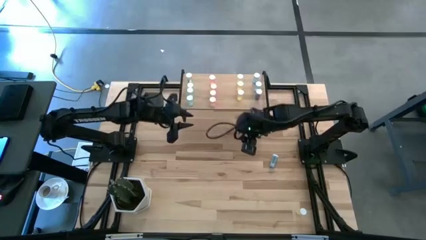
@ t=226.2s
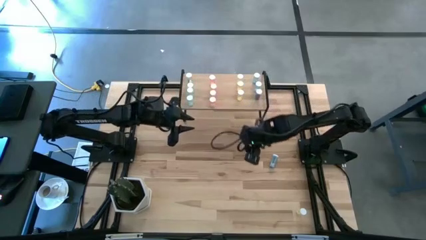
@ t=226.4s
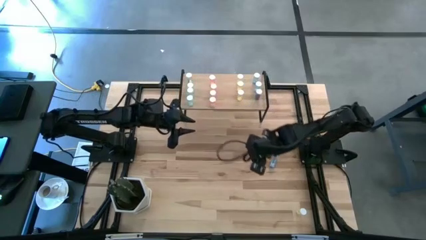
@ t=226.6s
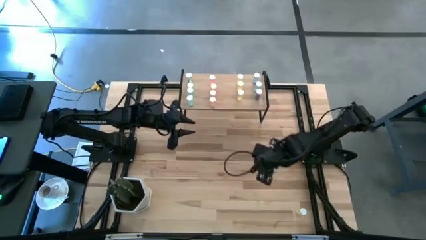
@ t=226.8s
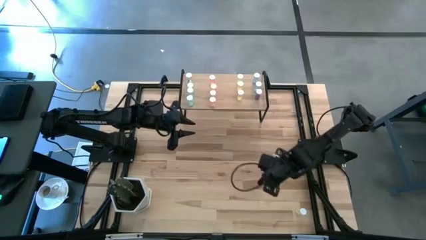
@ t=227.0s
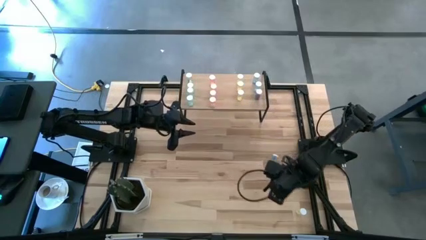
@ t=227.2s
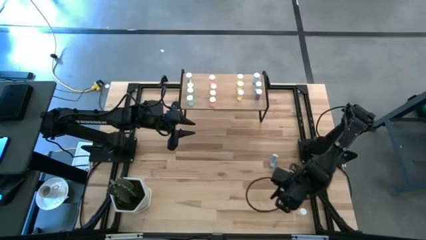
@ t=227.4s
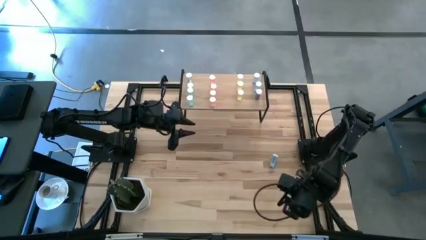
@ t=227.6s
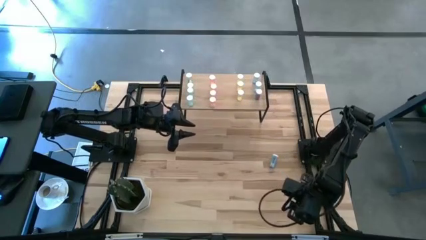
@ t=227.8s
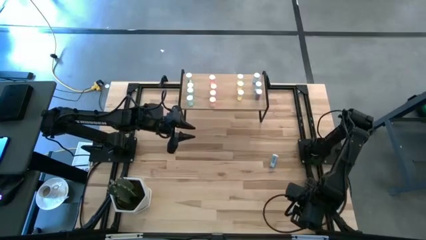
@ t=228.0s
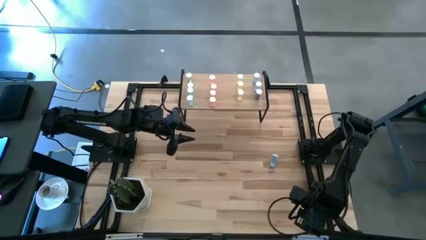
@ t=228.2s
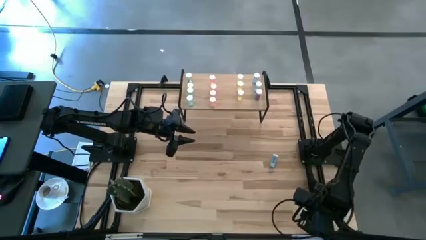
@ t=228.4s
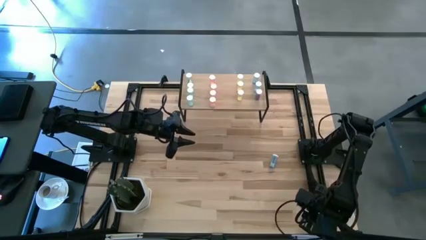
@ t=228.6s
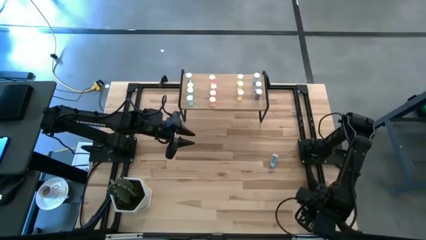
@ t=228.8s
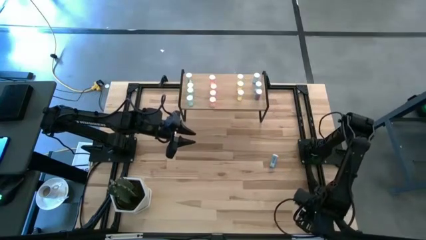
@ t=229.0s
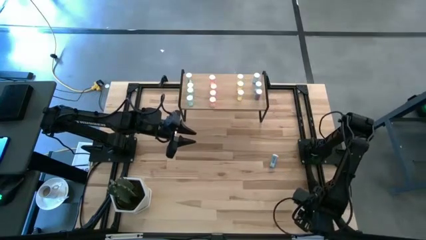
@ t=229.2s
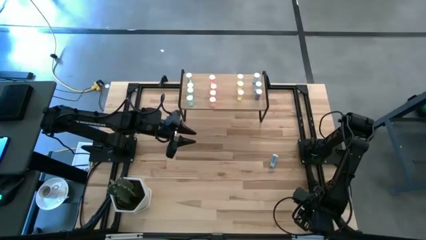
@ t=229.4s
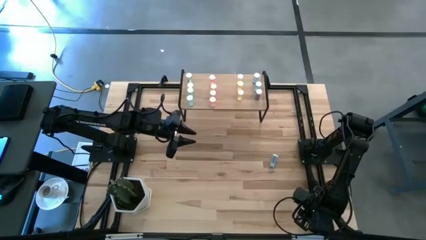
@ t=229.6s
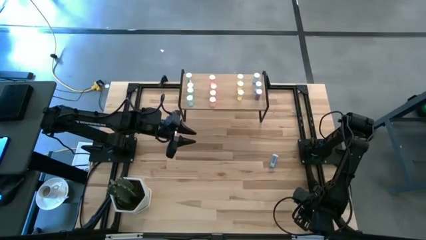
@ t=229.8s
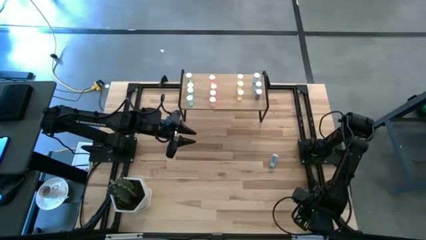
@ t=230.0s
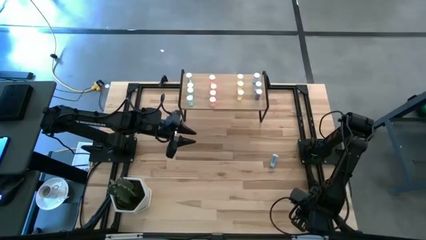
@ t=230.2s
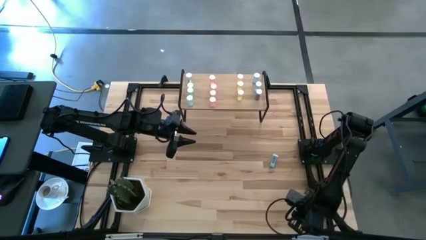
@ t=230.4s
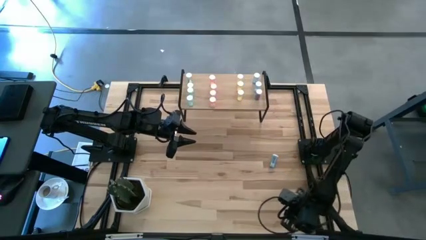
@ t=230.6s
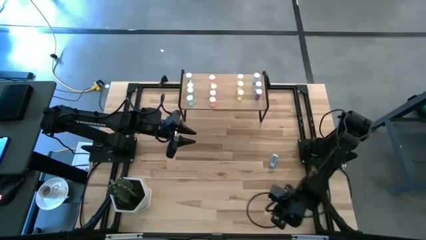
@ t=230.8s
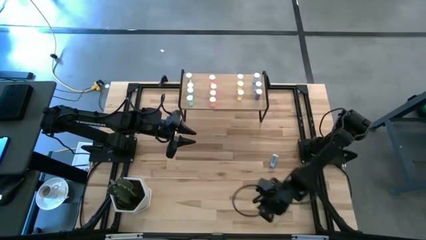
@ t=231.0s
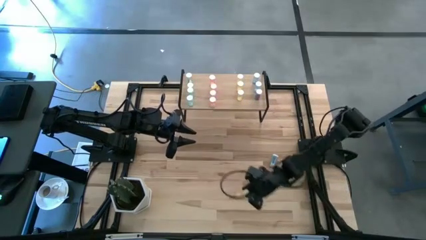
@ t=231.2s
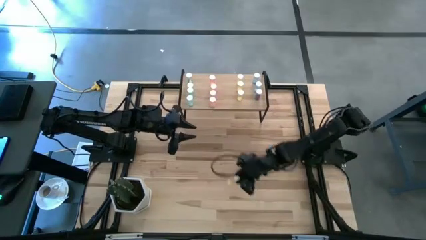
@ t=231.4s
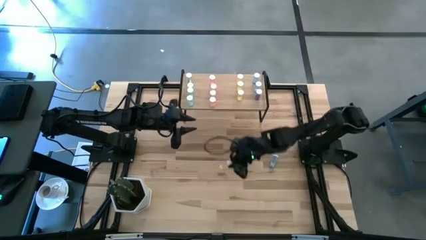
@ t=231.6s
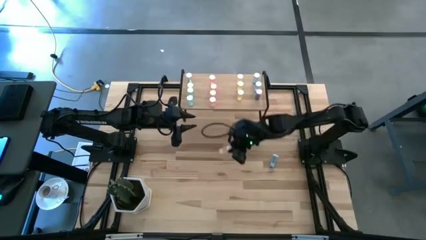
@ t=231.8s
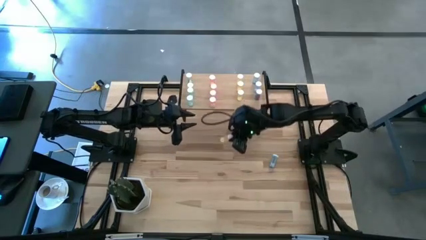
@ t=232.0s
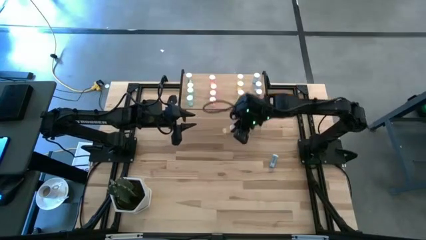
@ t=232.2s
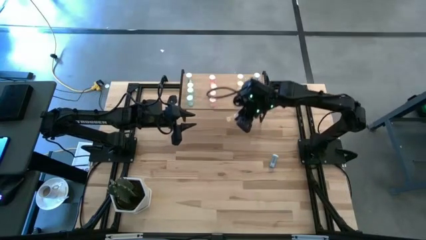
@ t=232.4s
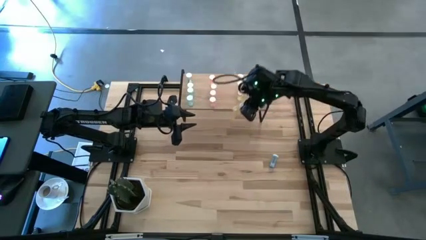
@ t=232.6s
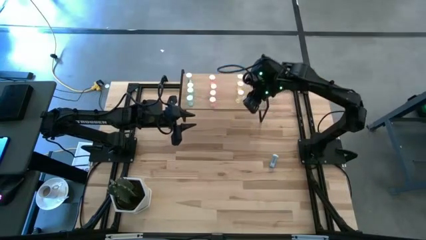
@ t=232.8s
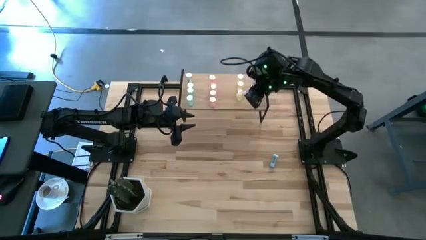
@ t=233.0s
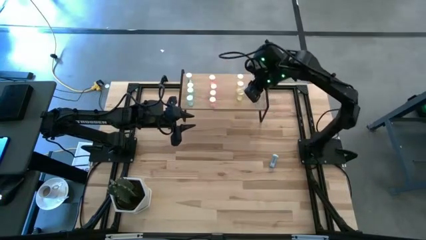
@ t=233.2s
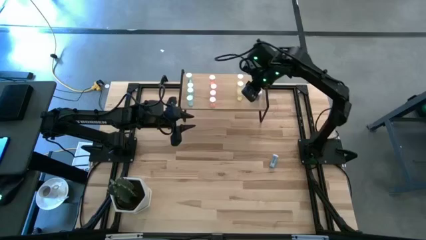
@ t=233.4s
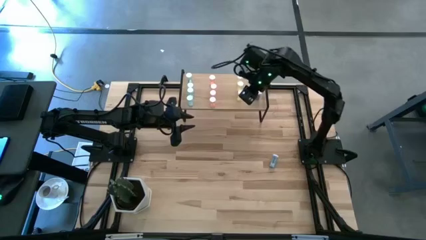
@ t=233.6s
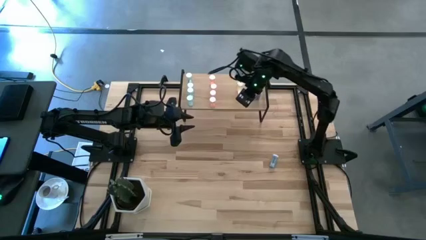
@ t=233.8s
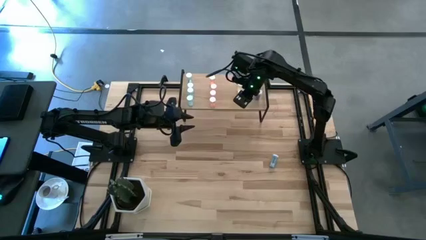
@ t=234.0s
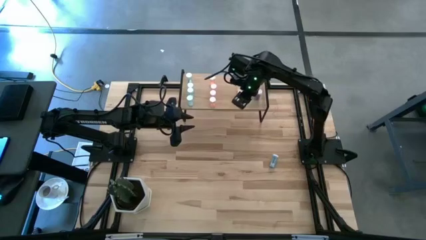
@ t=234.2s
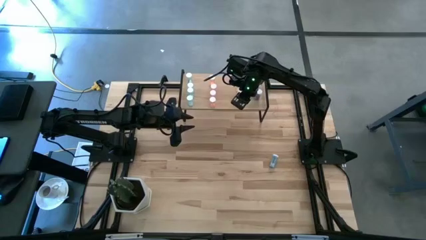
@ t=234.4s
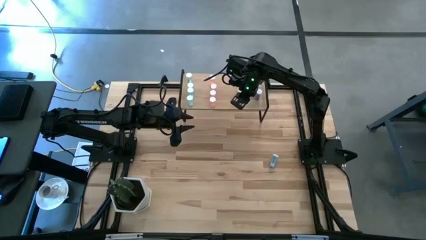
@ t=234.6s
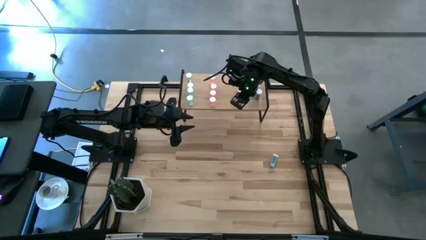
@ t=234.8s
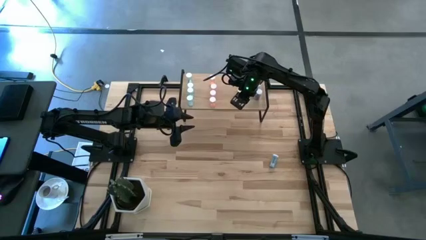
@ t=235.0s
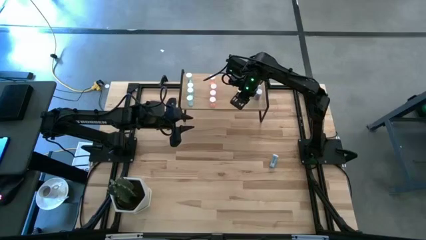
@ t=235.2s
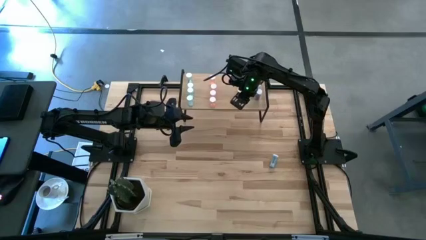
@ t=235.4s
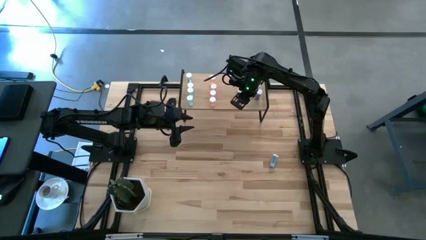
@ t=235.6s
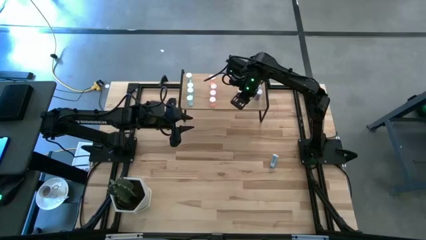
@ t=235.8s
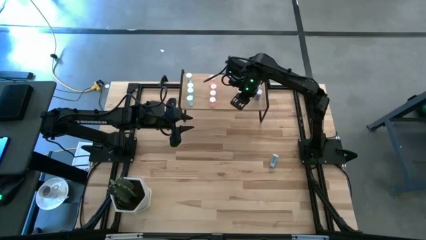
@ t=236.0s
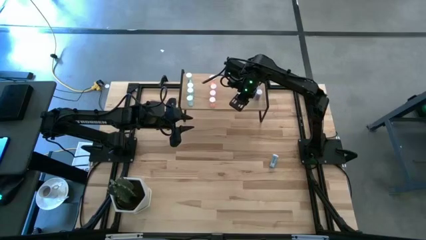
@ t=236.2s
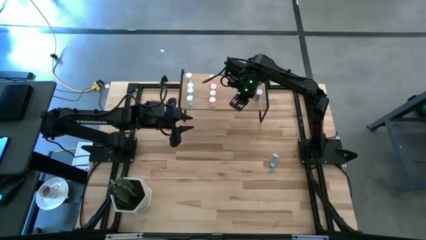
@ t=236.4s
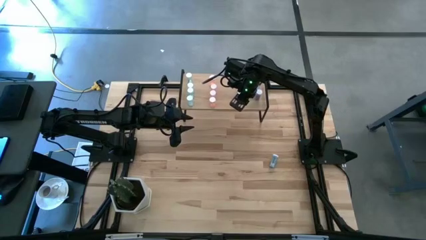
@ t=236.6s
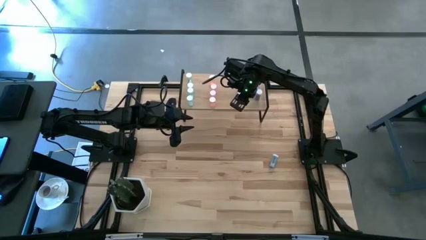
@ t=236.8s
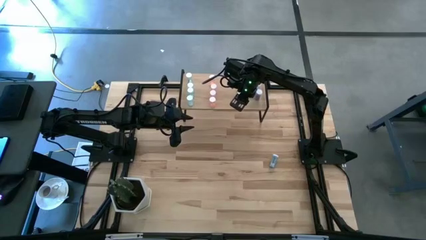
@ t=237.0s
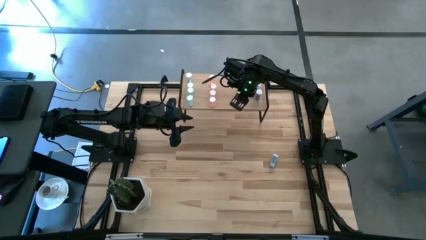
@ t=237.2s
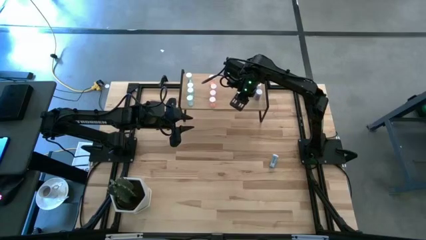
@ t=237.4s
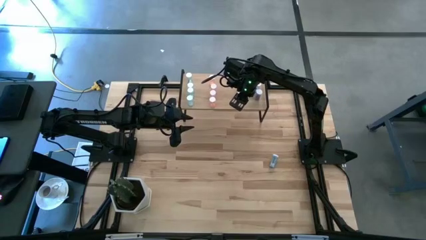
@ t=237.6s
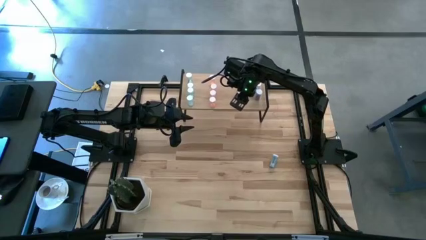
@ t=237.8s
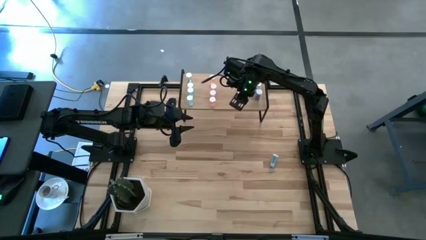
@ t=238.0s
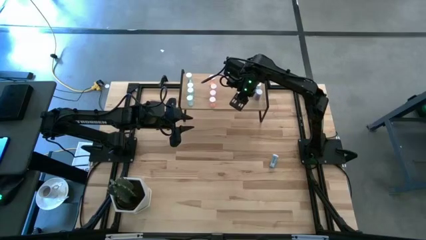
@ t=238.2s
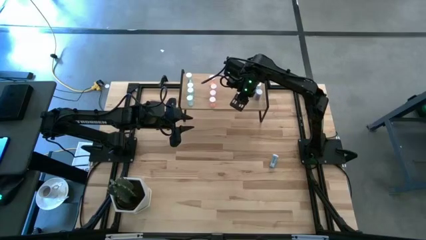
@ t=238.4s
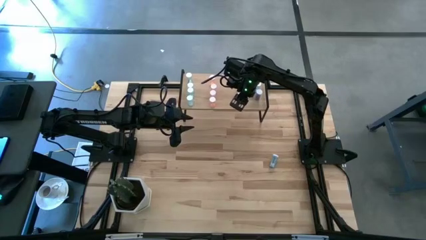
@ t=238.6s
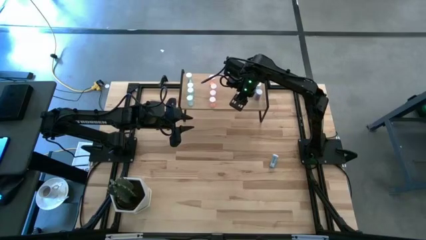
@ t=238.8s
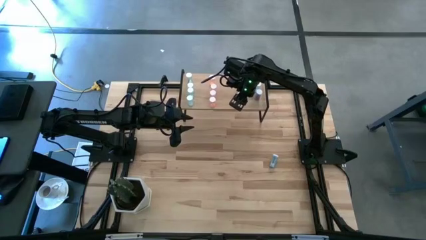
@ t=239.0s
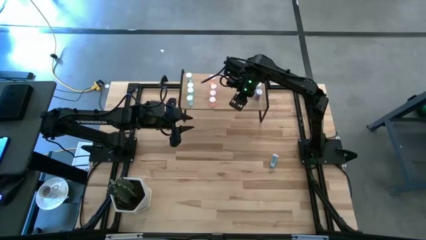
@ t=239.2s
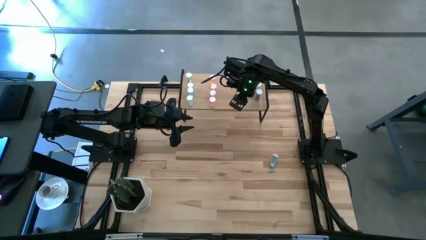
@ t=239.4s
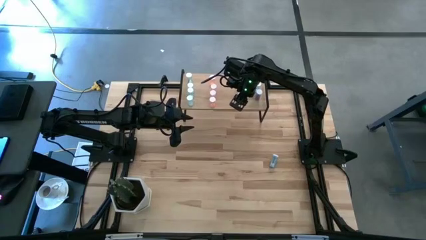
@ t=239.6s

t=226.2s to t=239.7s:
Task: Pick and place medicine bottles onto shelf by color
Align the yellow pill bottle with the yellow pill bottle
